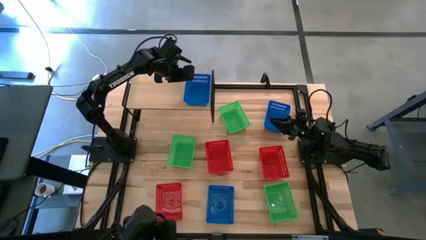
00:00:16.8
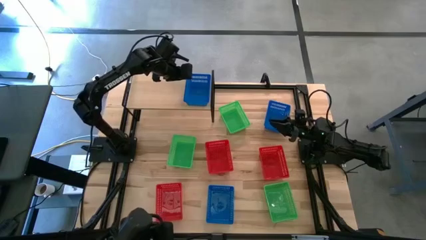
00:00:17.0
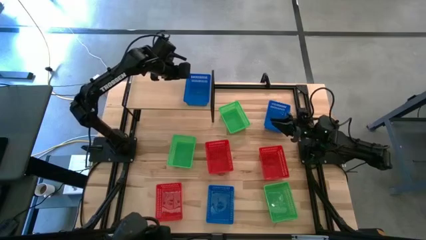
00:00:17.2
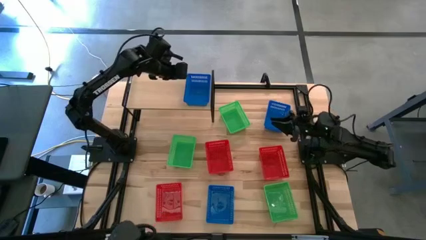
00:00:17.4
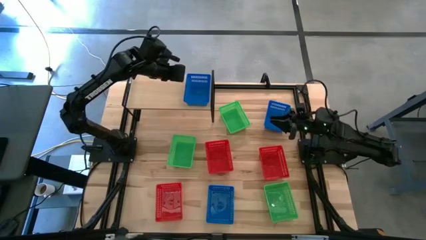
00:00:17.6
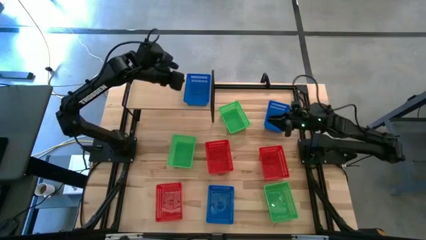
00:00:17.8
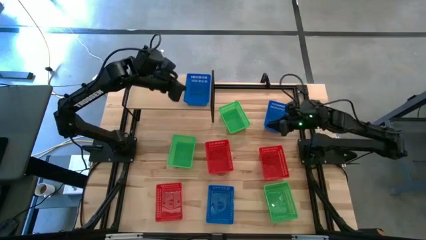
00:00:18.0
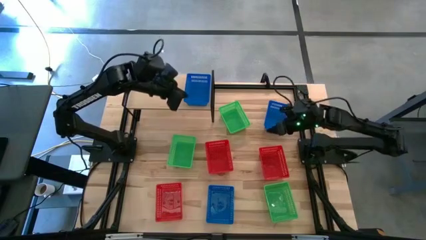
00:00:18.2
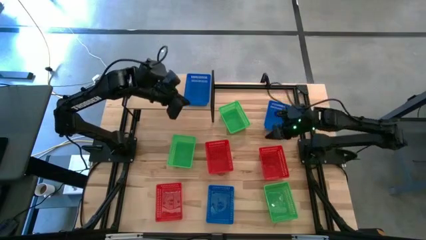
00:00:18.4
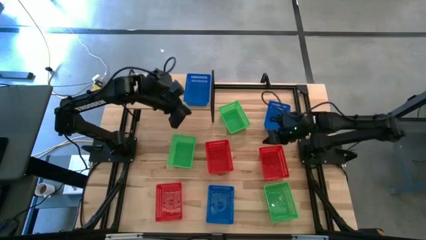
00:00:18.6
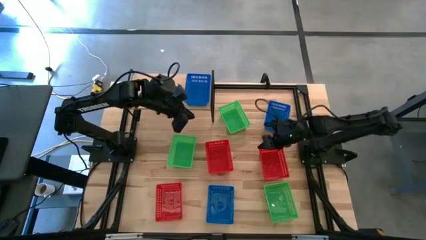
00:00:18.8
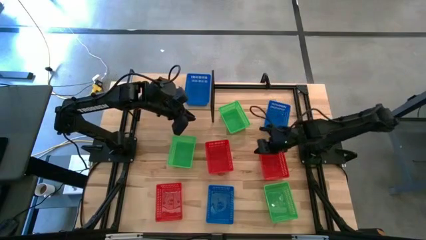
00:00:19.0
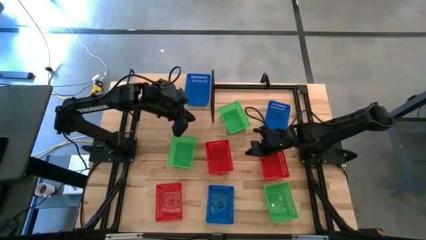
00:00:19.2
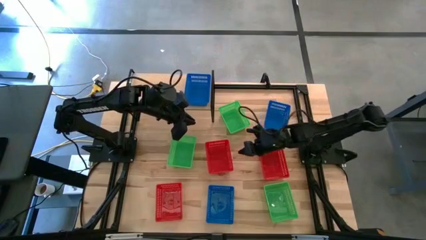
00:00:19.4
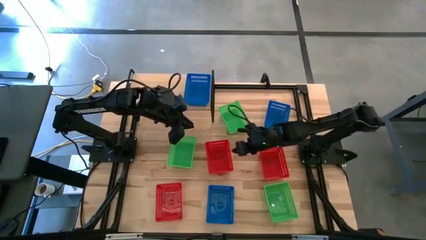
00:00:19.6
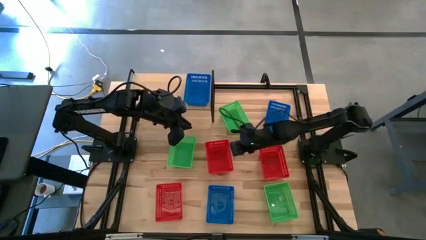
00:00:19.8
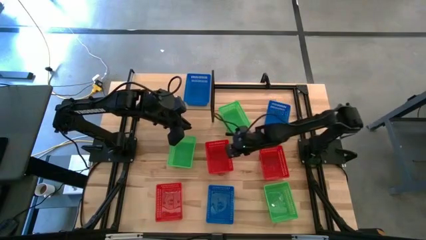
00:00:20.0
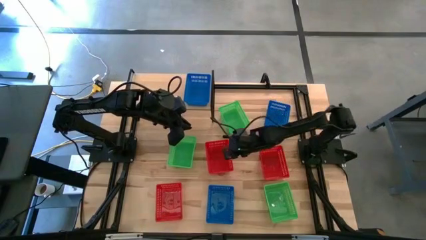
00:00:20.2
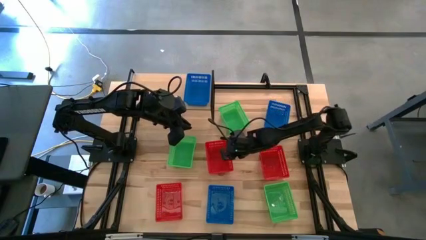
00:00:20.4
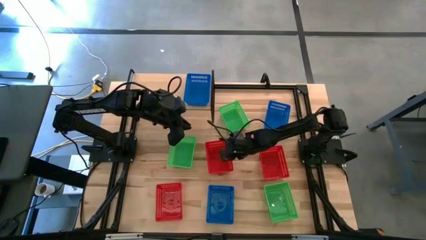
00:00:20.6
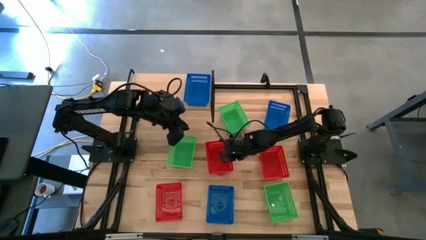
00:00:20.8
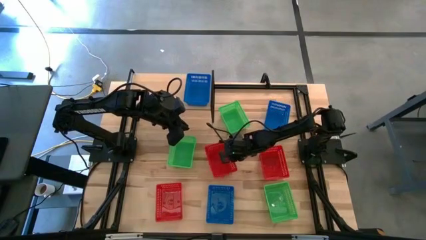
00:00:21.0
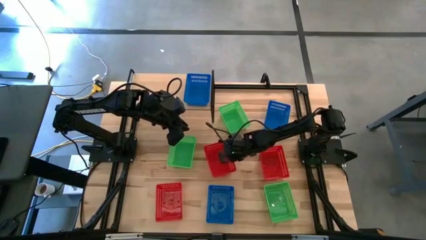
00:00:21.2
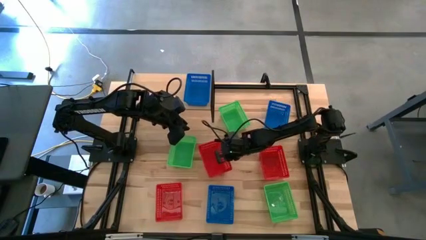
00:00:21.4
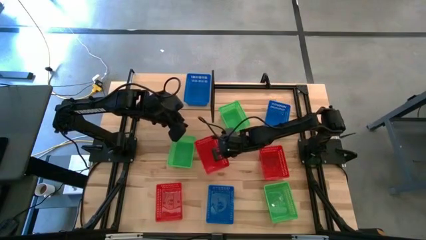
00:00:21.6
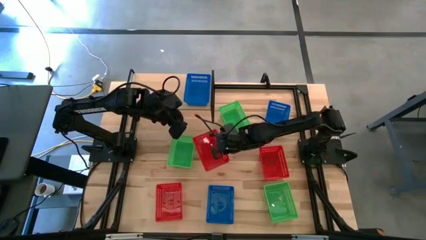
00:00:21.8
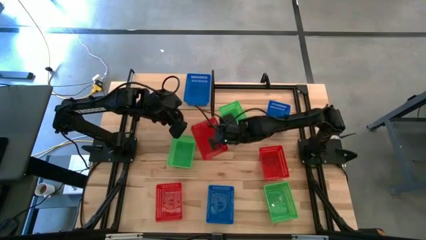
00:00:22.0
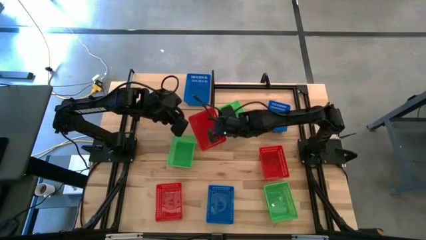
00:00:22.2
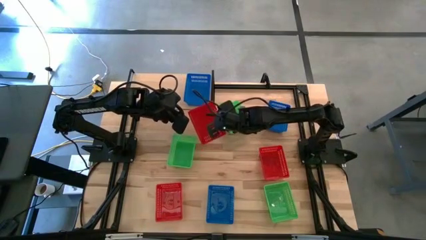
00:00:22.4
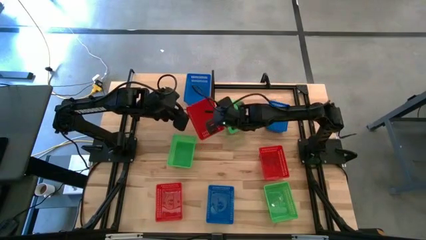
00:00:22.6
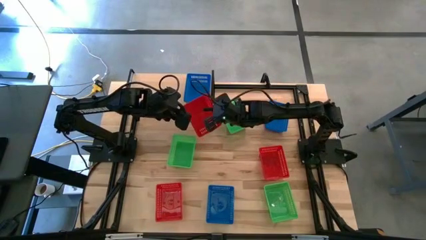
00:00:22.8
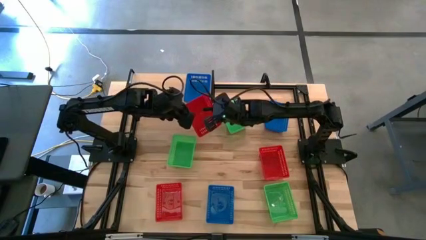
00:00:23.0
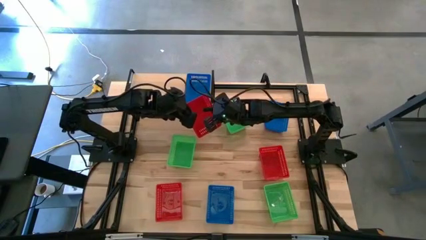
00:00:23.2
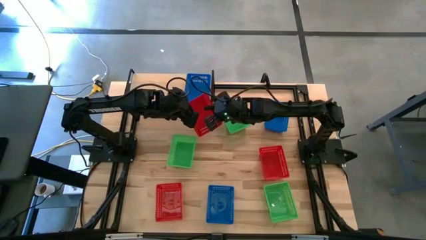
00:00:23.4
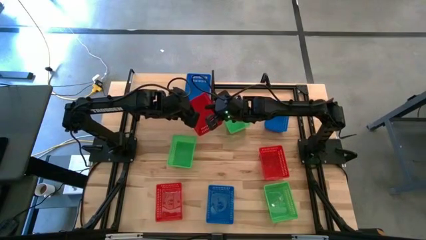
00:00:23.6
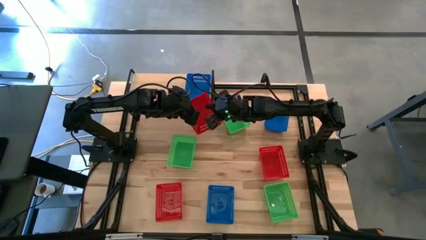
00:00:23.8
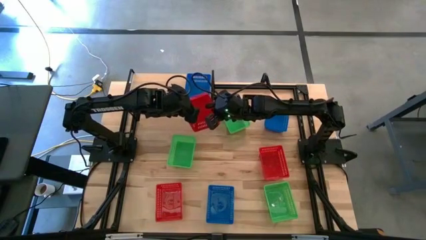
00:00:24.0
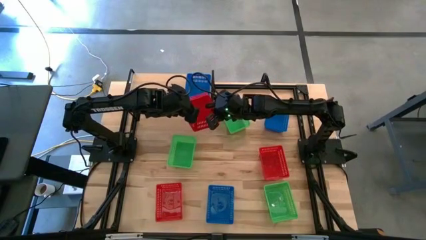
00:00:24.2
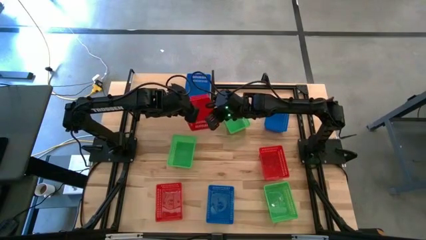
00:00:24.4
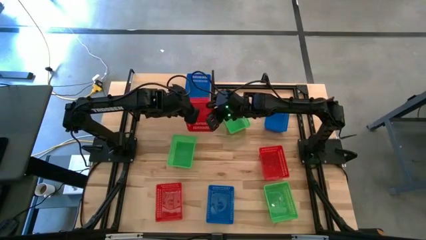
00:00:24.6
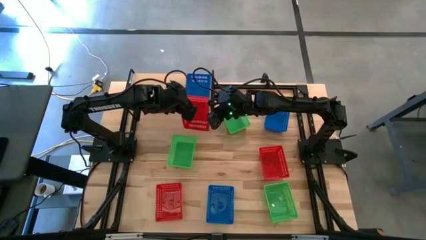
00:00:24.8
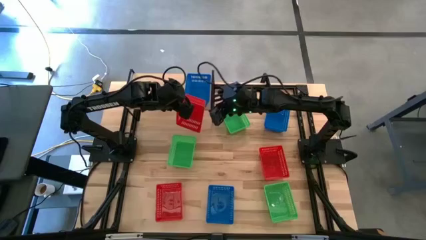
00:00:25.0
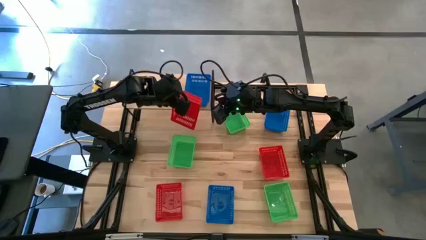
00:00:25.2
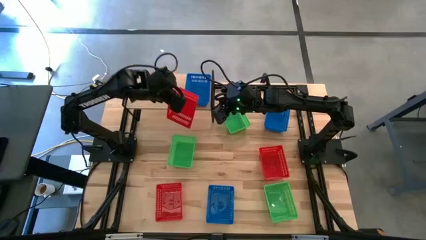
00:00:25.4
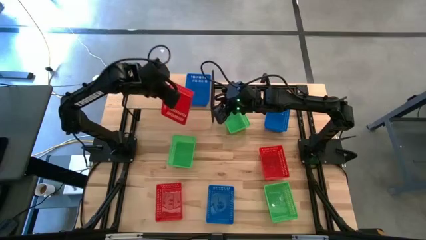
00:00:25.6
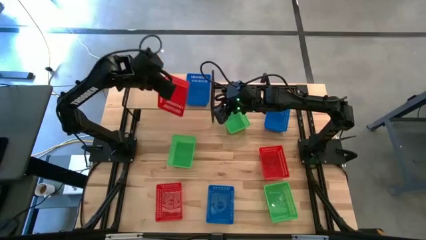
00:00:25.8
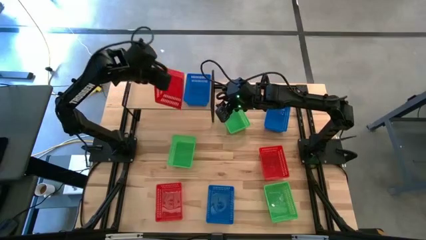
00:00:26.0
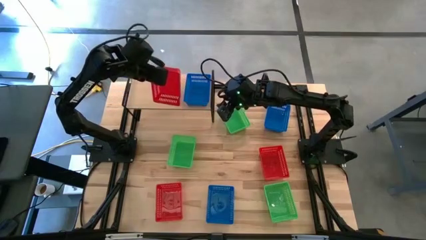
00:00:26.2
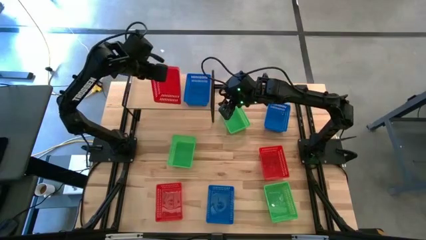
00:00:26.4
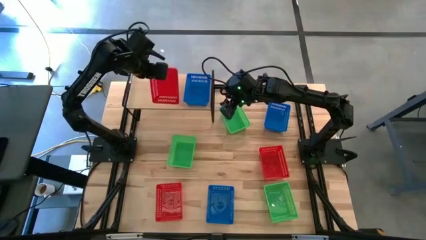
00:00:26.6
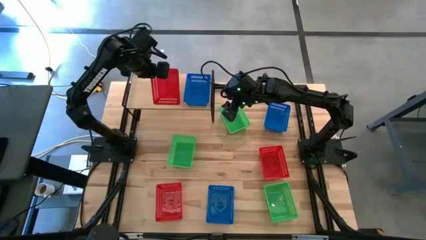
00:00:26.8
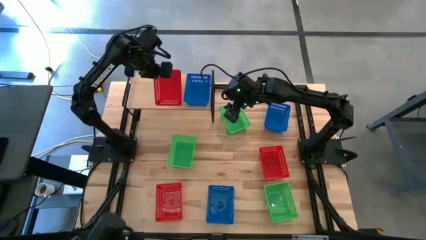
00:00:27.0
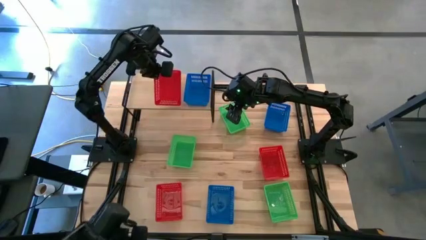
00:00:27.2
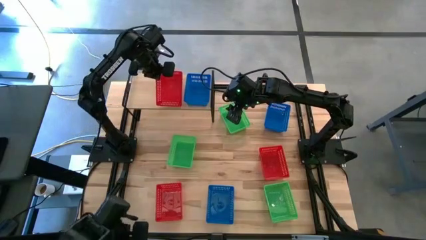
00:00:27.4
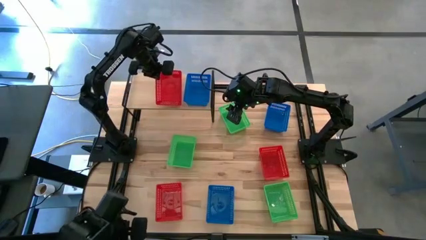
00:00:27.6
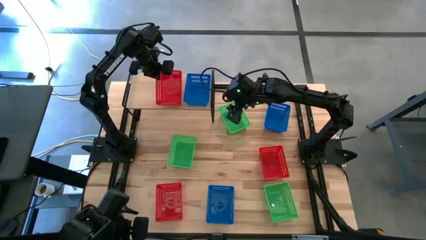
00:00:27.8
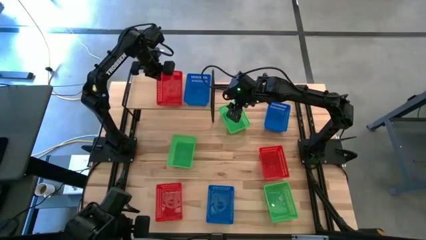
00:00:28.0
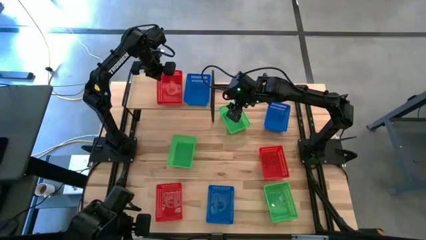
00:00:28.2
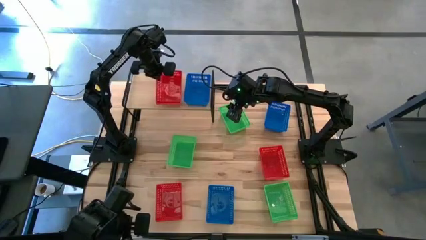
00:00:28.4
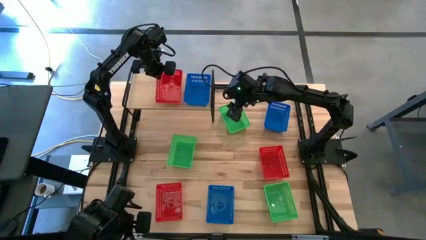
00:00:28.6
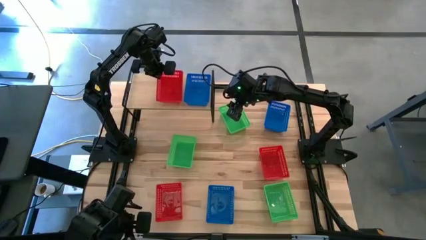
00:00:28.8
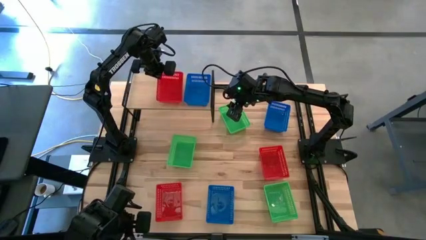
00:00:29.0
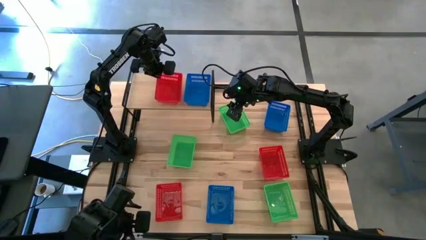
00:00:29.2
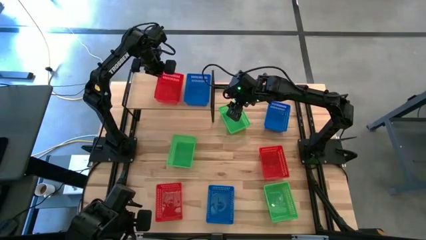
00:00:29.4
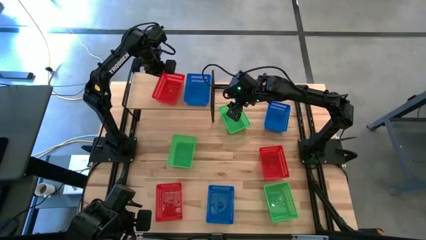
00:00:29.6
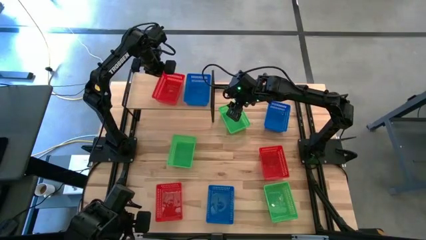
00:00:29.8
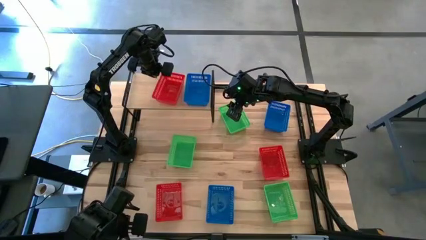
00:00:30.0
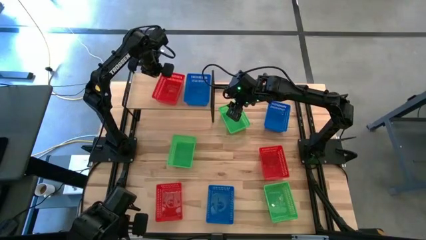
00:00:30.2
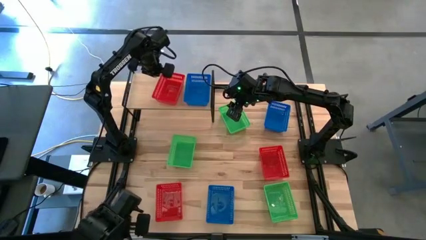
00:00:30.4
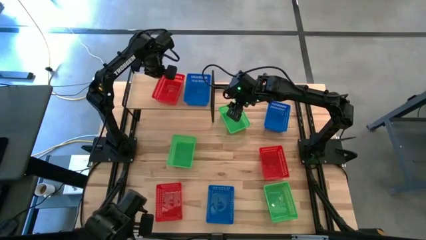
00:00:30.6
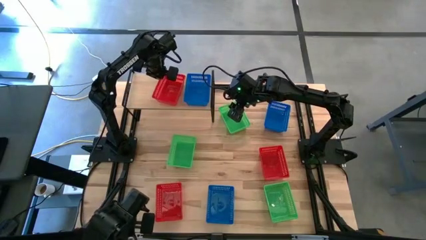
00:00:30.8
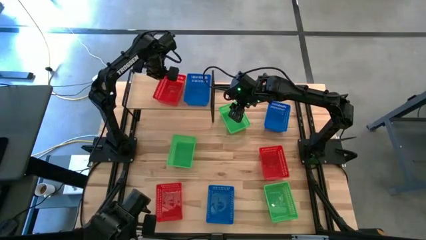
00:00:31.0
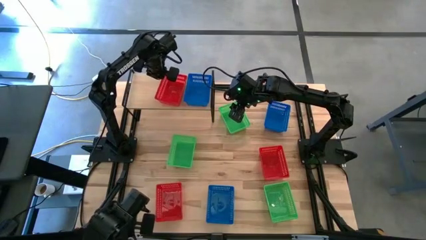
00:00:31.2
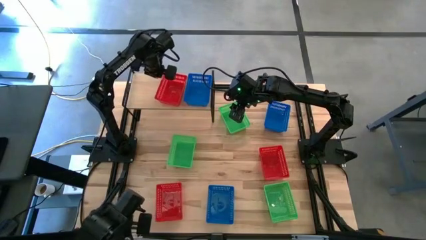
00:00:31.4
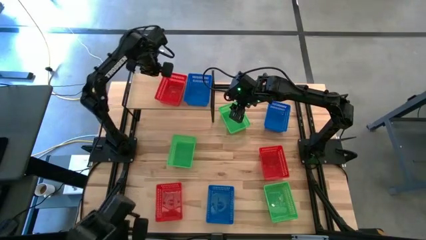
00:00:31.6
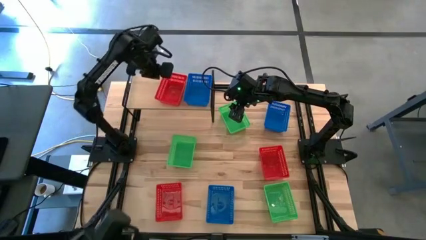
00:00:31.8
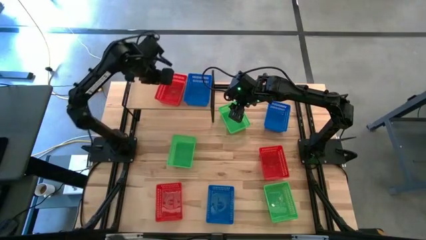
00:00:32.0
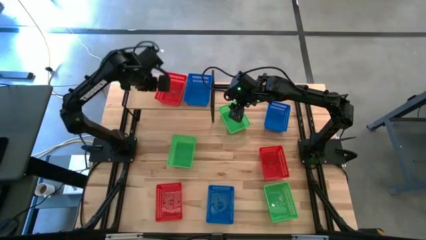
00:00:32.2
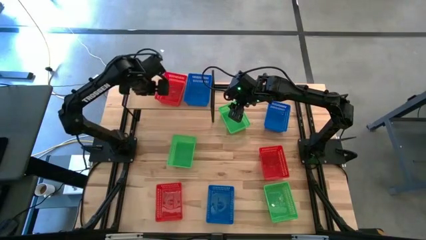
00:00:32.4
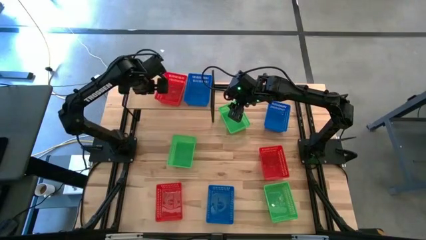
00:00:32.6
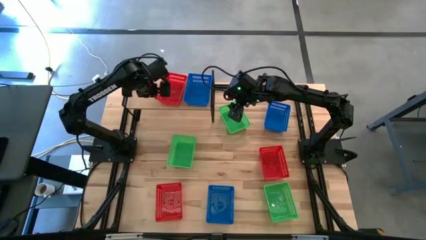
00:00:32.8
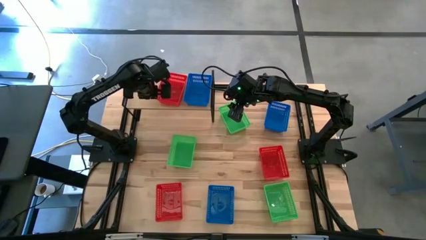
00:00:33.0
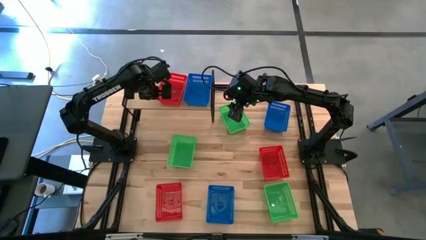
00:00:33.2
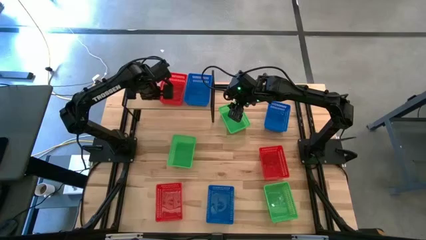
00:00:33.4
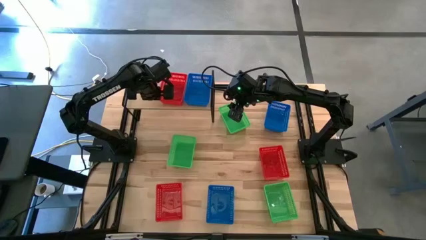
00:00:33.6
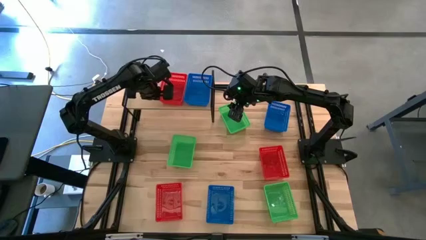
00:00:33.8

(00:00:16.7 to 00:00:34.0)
Task: Stack baskets on shelf by color
Put the top left red basket on the shelf
